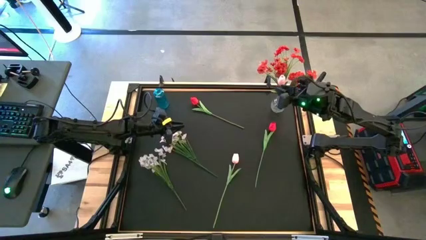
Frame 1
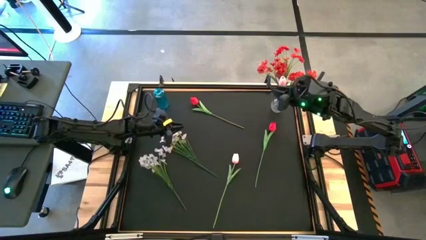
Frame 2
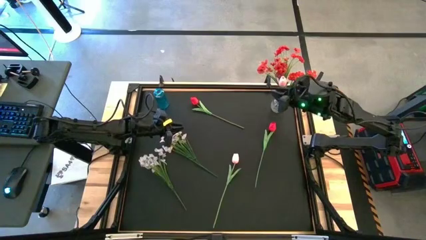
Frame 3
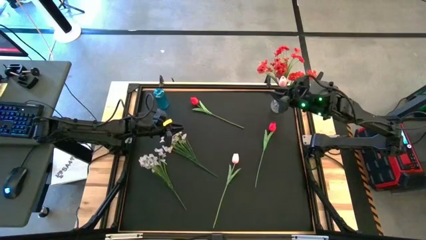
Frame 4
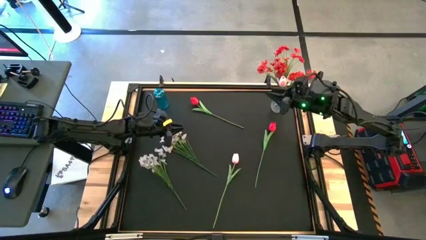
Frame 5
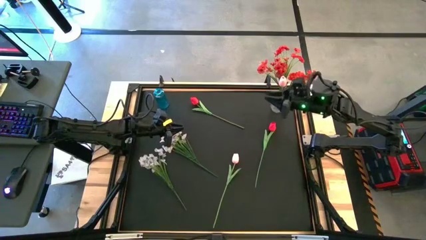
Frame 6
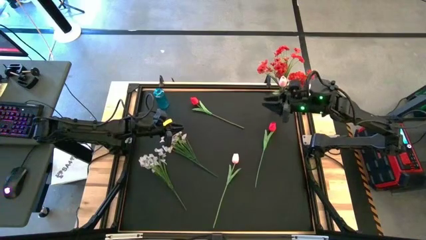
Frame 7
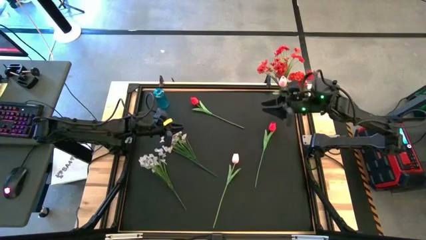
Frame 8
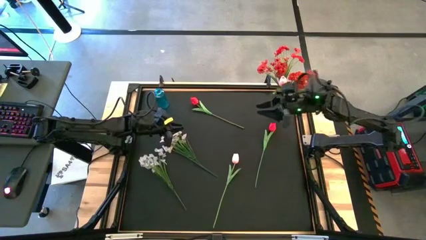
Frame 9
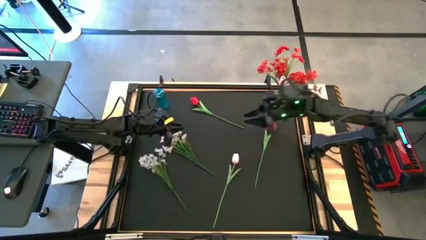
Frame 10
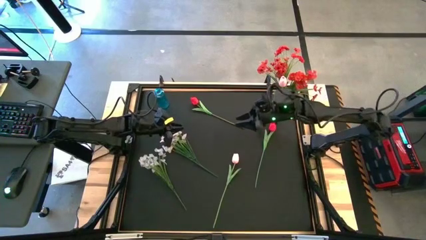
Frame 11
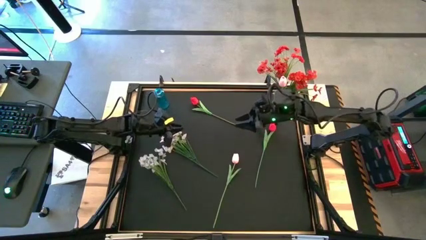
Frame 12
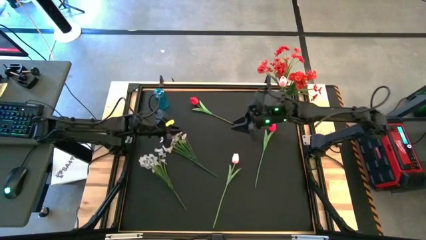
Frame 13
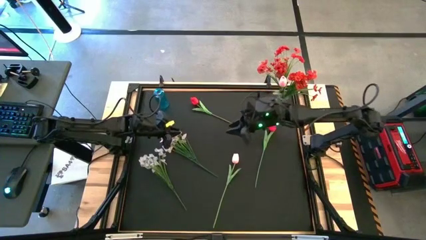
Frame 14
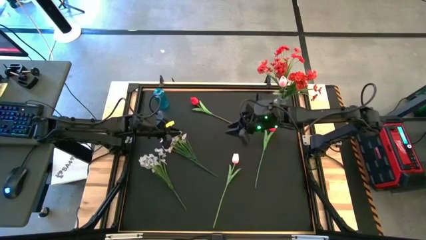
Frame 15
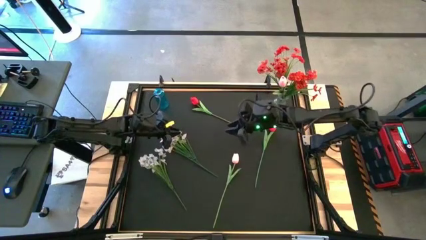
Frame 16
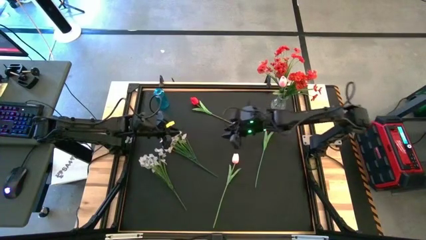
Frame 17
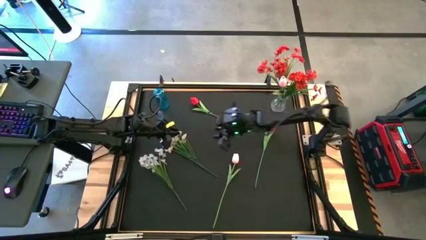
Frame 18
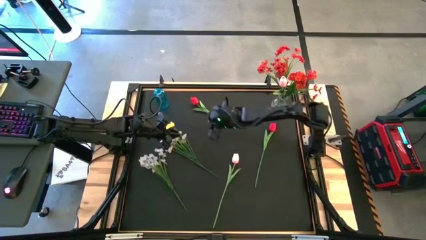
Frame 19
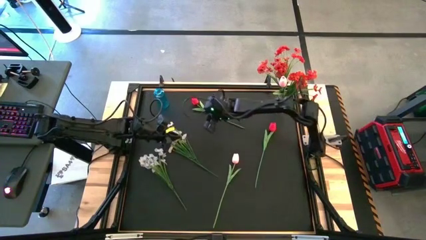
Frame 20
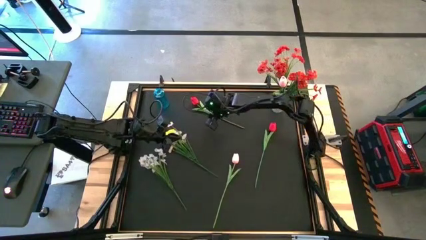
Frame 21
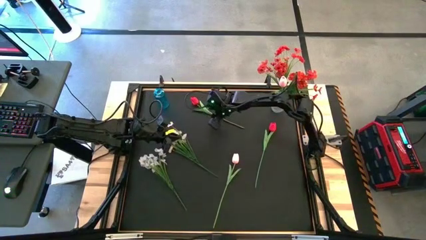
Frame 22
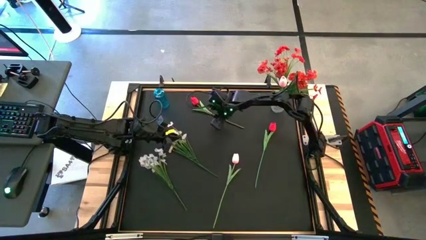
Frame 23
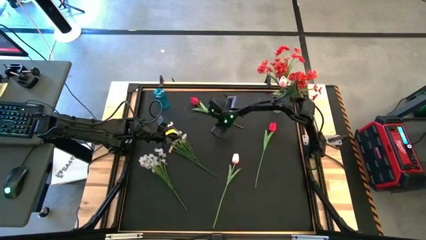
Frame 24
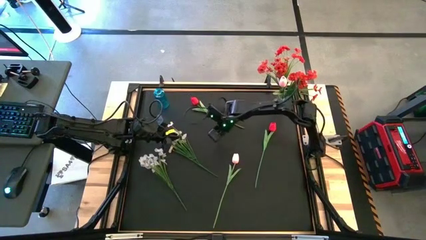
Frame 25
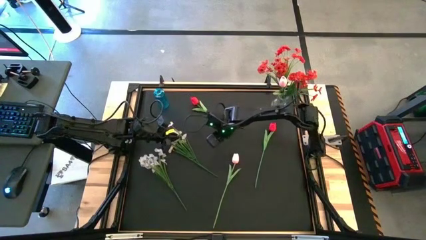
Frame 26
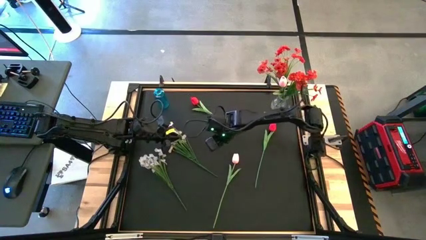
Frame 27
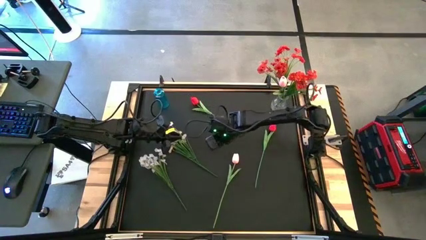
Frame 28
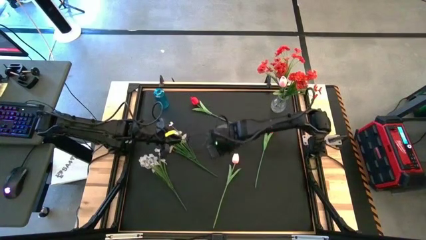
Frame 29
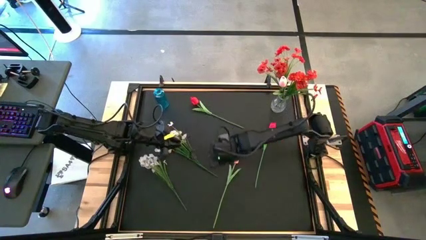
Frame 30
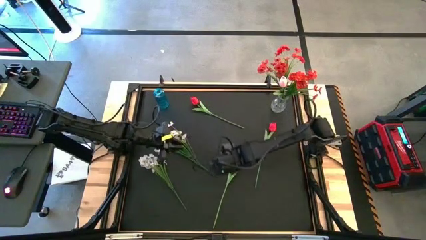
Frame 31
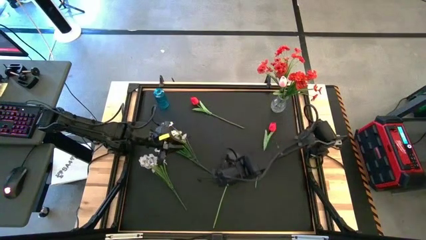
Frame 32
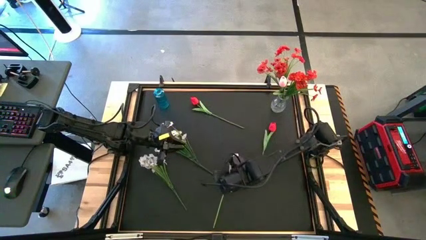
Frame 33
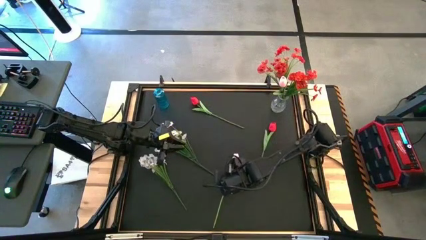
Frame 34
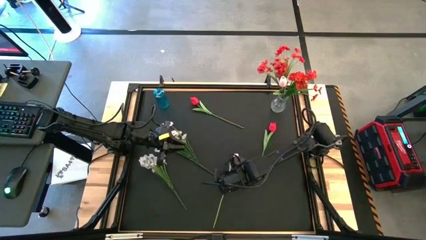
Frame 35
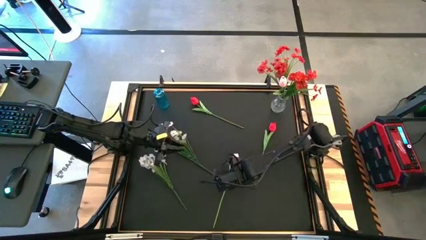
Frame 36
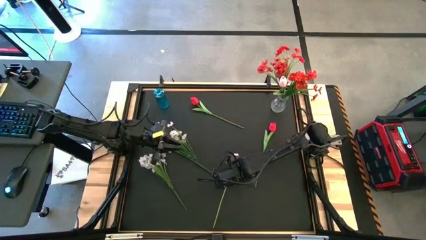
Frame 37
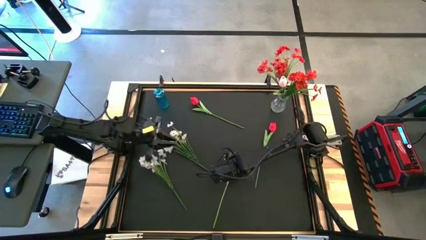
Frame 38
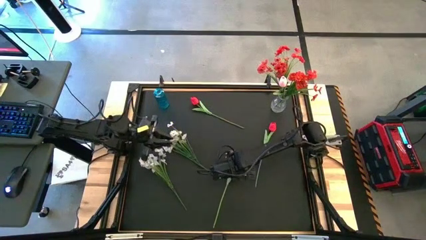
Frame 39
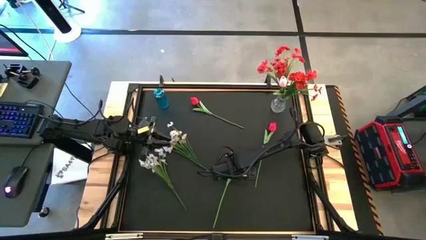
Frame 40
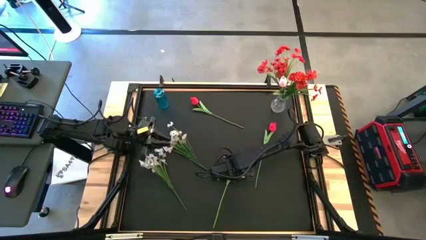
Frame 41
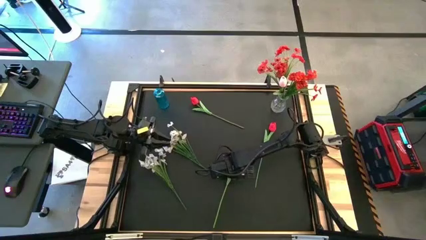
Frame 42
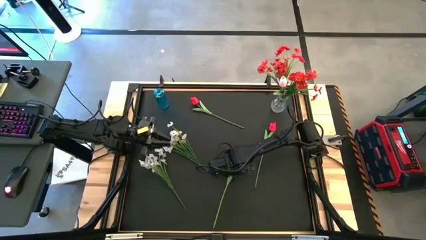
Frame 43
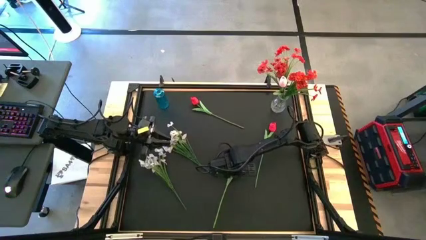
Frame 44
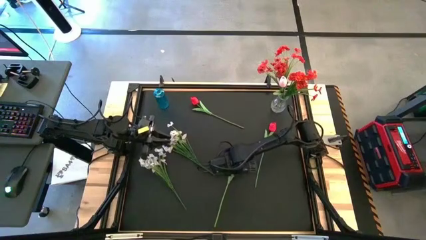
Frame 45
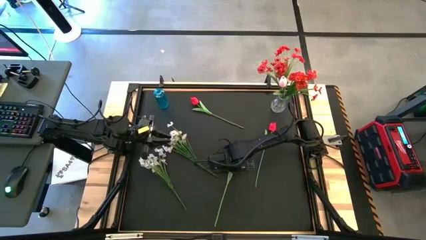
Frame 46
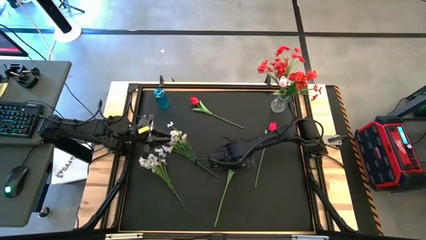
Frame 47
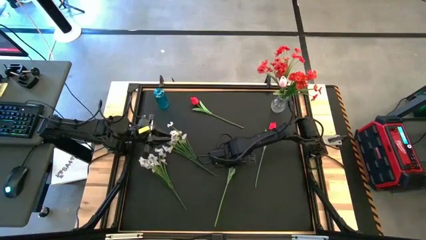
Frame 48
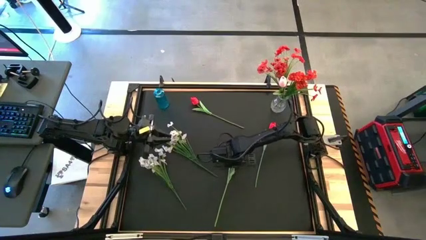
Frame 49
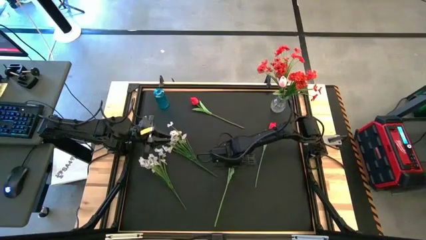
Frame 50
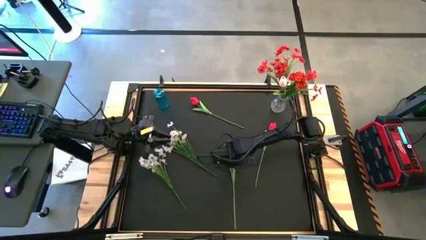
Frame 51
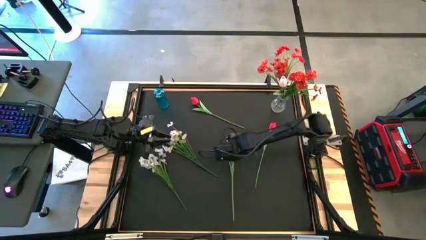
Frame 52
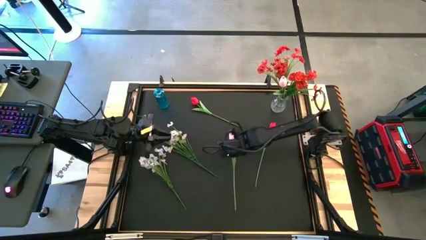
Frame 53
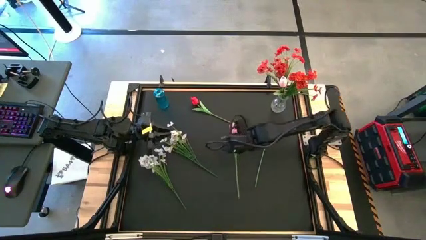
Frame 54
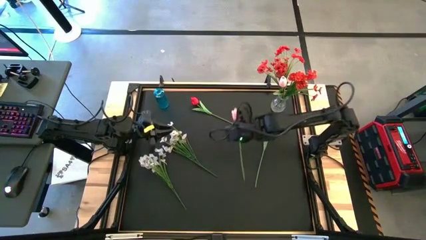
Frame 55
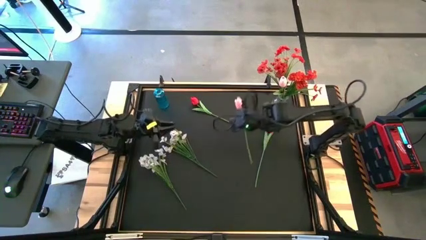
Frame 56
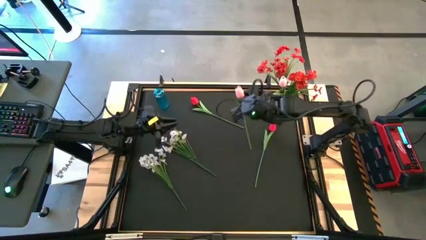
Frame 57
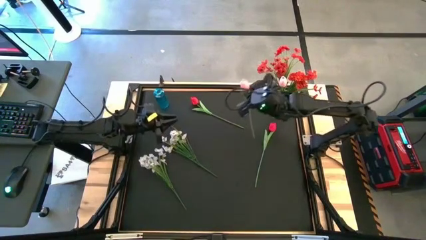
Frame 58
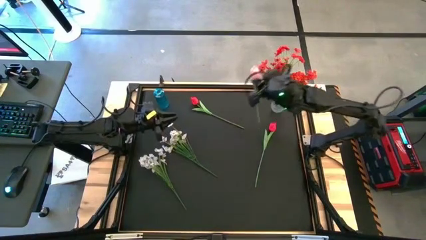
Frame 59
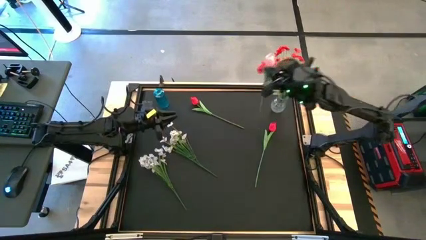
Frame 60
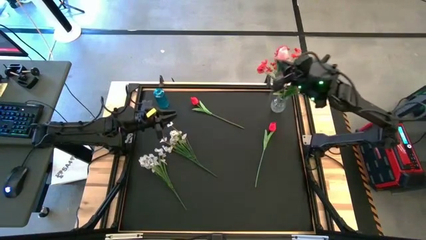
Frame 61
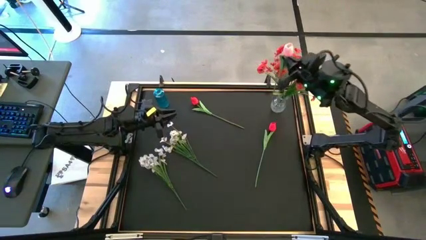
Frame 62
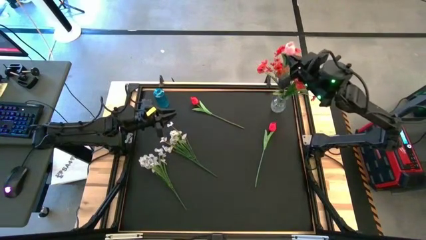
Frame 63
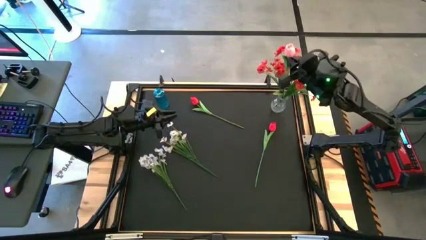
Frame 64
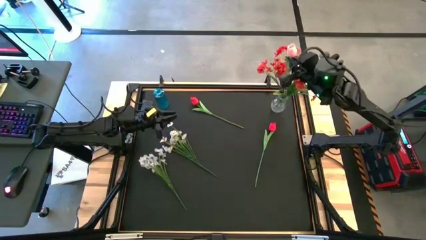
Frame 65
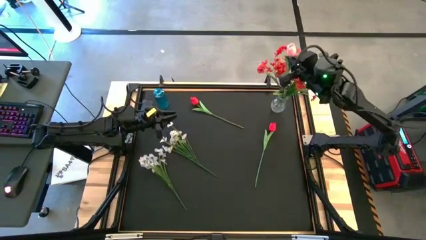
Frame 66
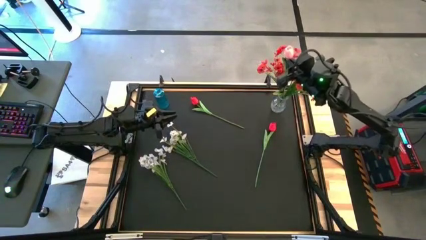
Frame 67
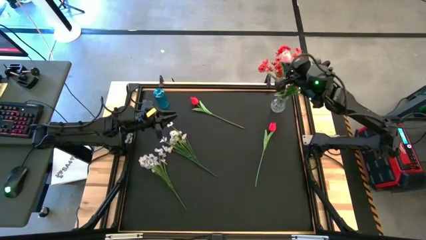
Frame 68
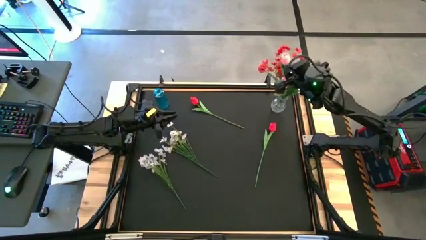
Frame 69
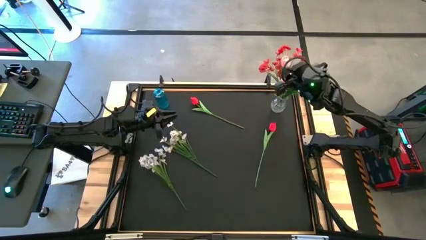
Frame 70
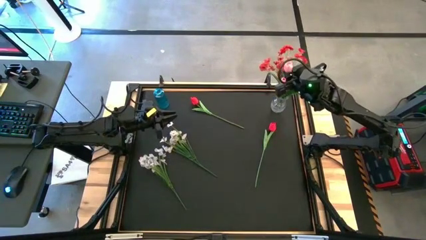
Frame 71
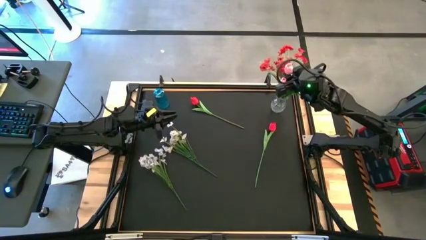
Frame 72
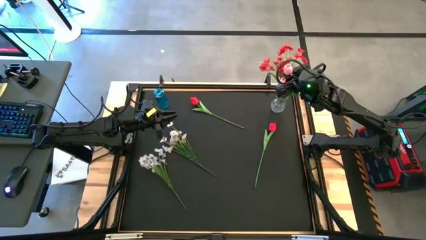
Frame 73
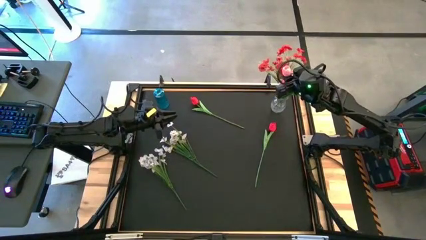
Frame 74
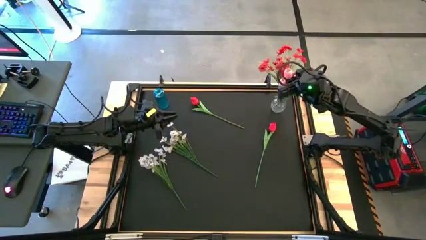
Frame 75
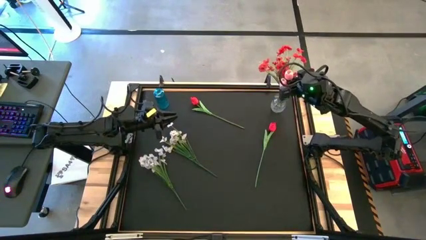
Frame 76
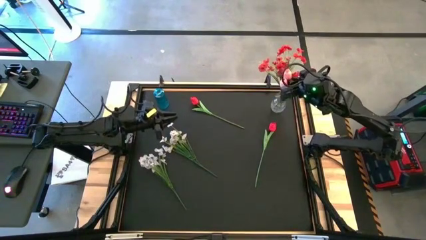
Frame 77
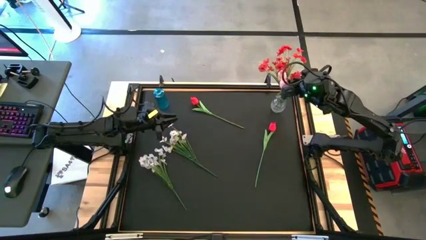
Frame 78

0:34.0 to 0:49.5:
Task: Sort flowers into vase by color
Put the pink flower into the transparent vase
